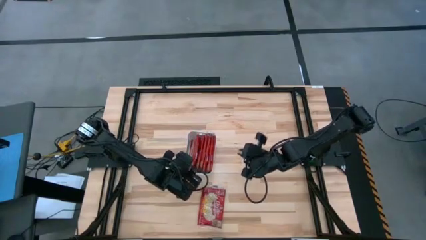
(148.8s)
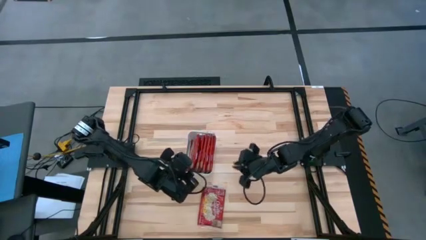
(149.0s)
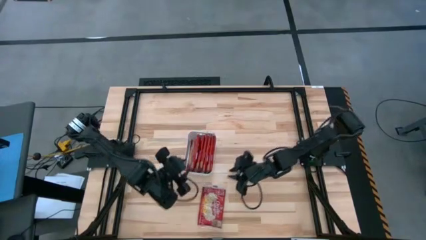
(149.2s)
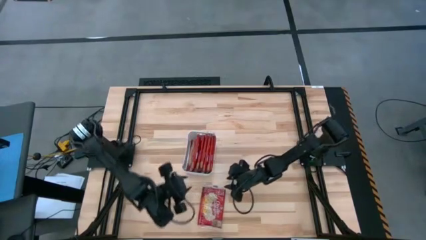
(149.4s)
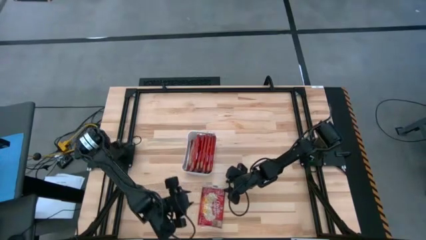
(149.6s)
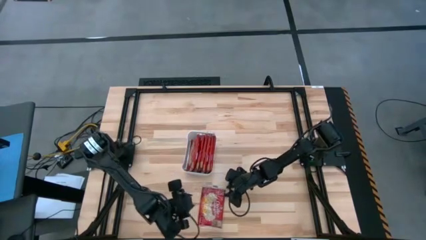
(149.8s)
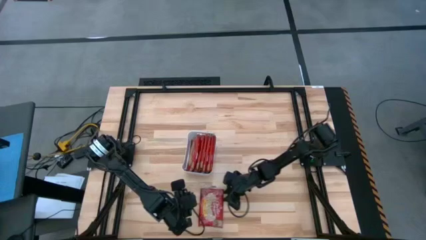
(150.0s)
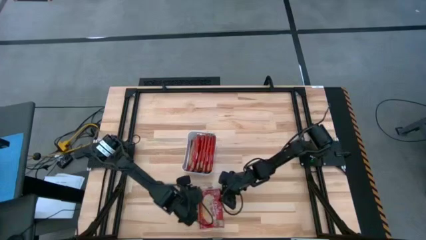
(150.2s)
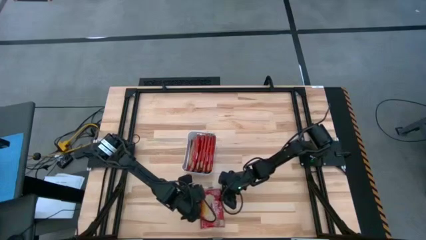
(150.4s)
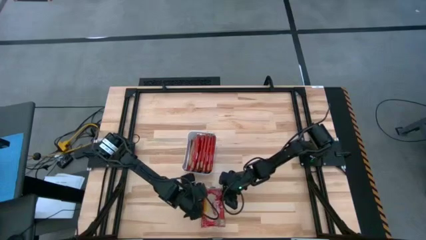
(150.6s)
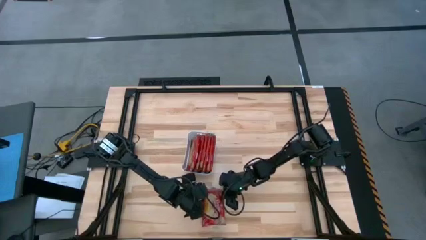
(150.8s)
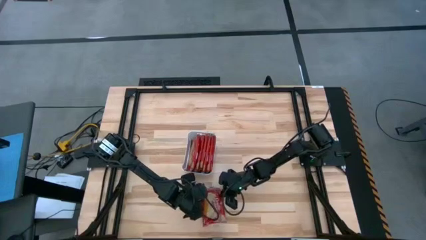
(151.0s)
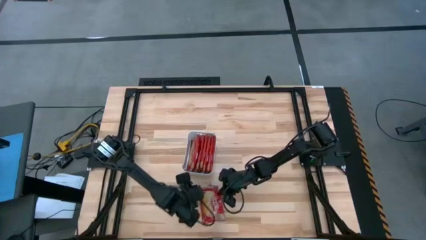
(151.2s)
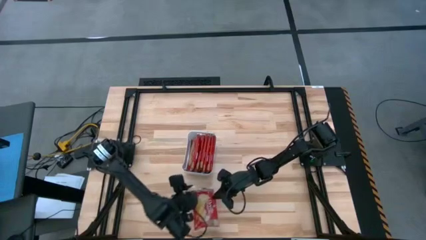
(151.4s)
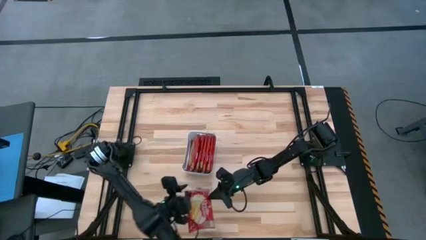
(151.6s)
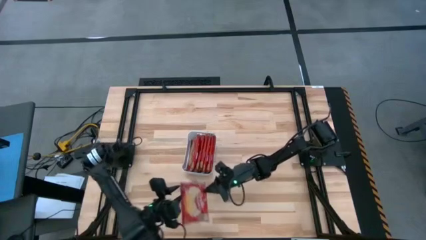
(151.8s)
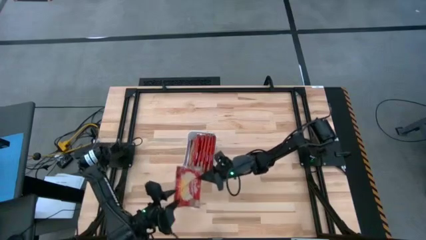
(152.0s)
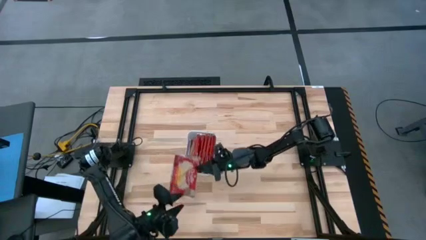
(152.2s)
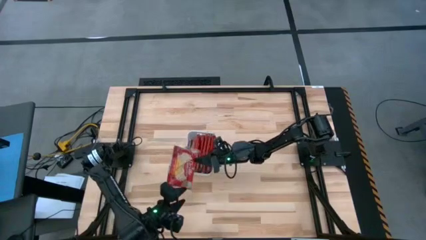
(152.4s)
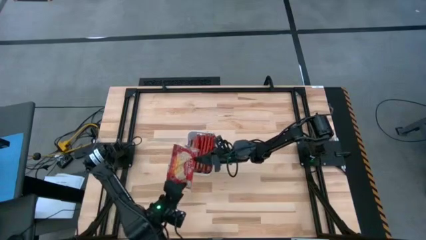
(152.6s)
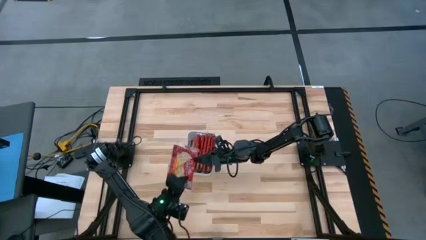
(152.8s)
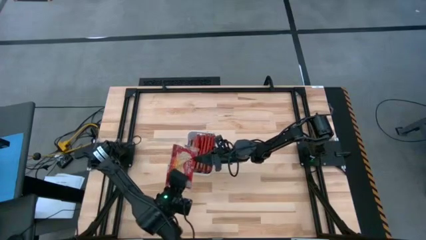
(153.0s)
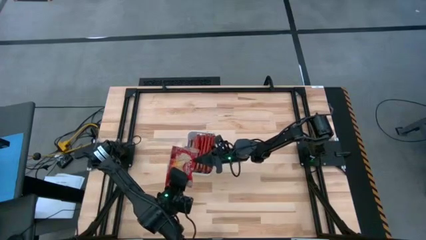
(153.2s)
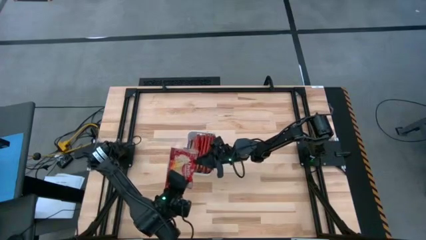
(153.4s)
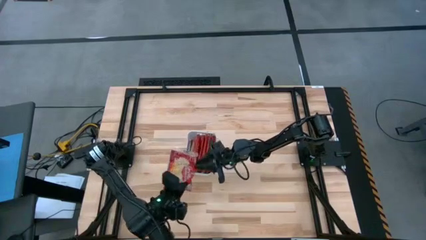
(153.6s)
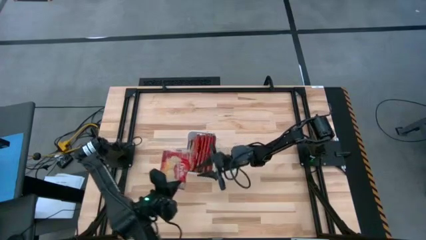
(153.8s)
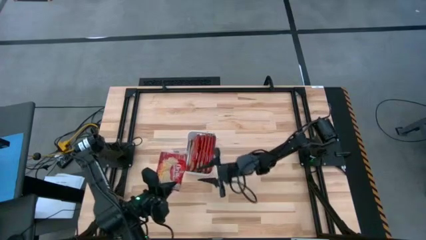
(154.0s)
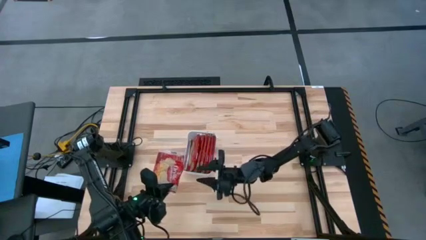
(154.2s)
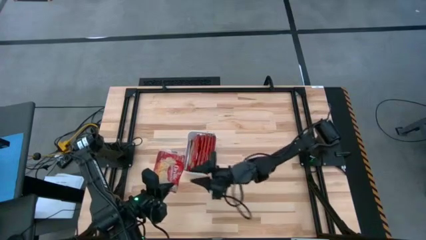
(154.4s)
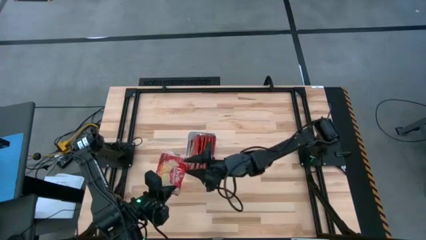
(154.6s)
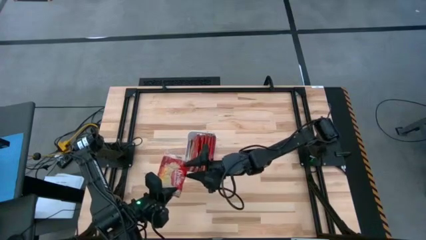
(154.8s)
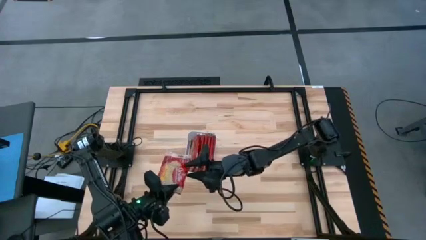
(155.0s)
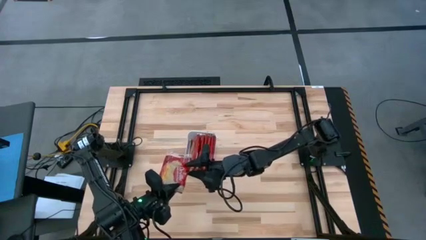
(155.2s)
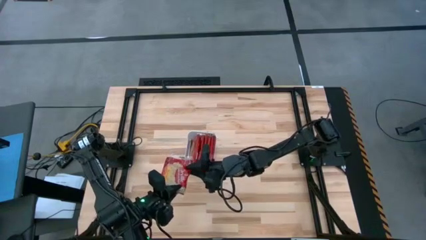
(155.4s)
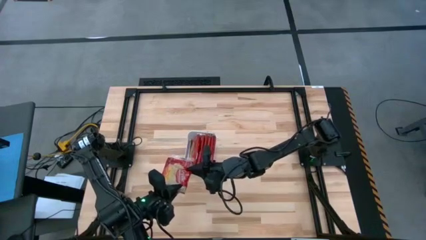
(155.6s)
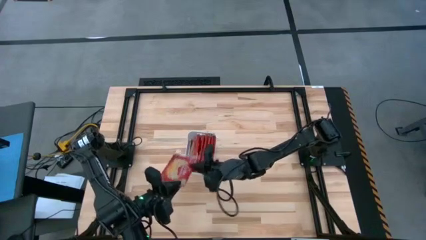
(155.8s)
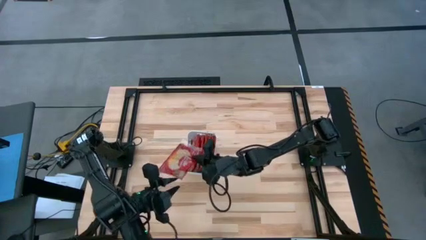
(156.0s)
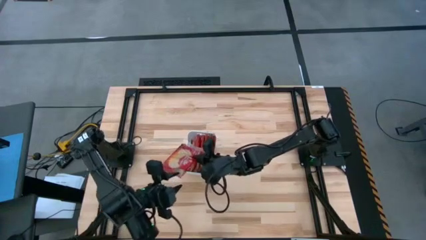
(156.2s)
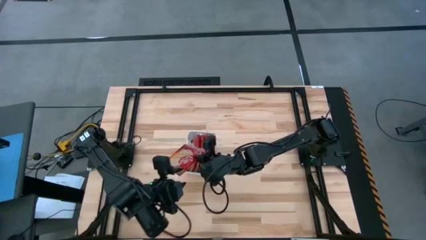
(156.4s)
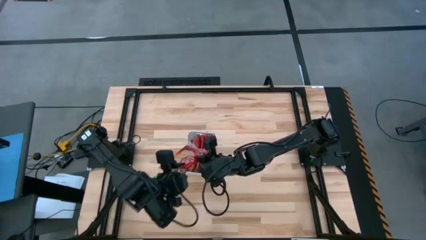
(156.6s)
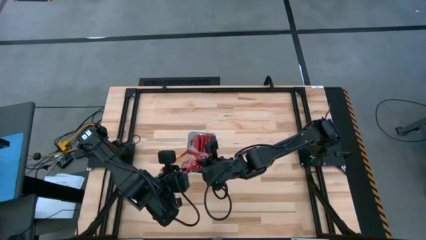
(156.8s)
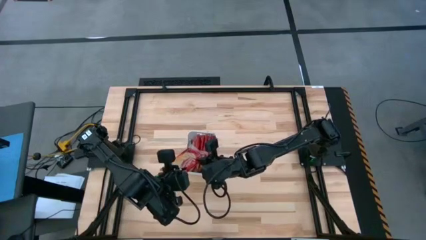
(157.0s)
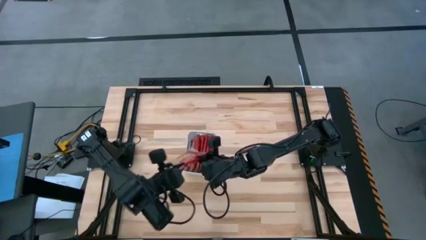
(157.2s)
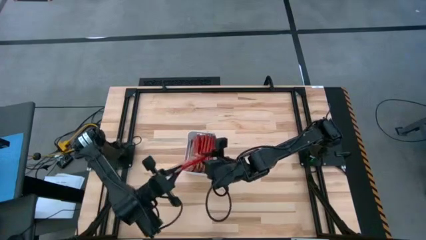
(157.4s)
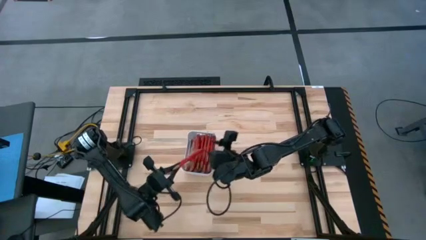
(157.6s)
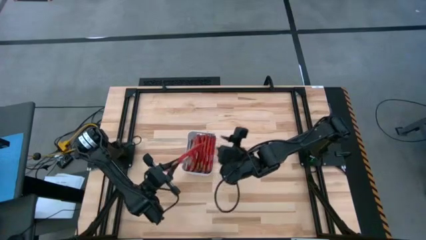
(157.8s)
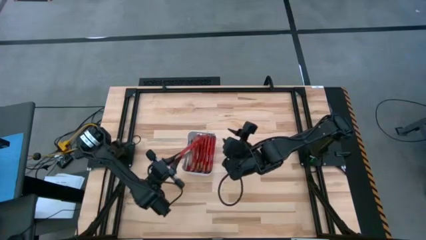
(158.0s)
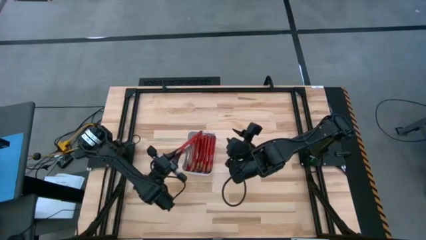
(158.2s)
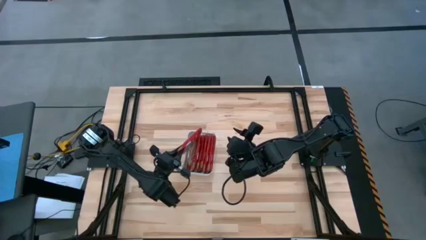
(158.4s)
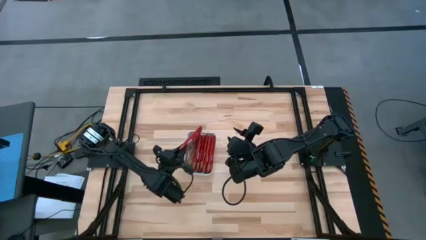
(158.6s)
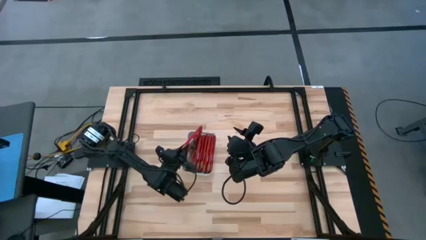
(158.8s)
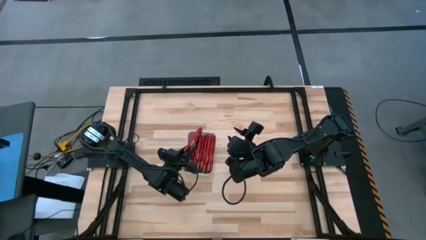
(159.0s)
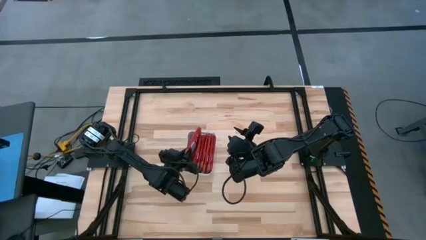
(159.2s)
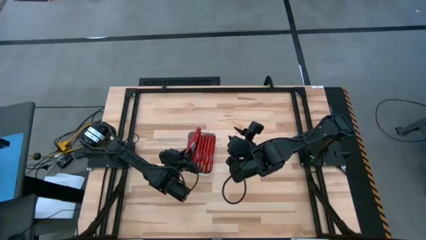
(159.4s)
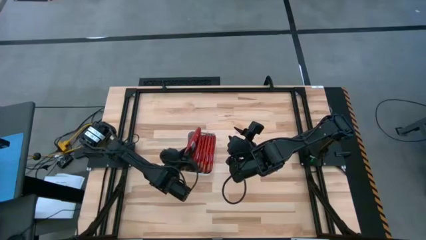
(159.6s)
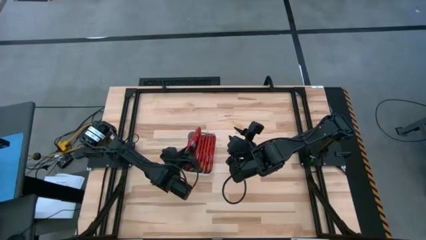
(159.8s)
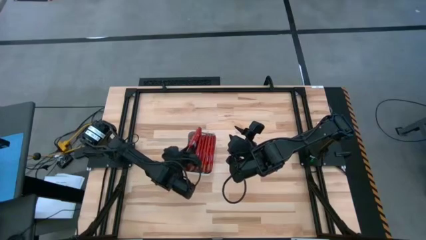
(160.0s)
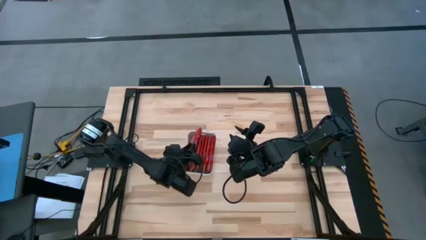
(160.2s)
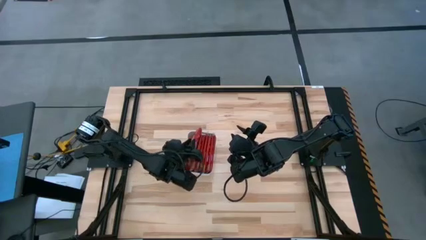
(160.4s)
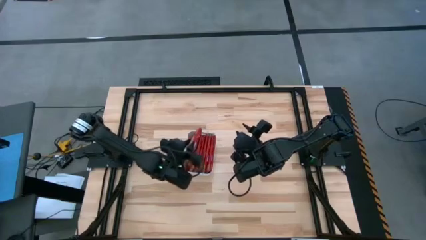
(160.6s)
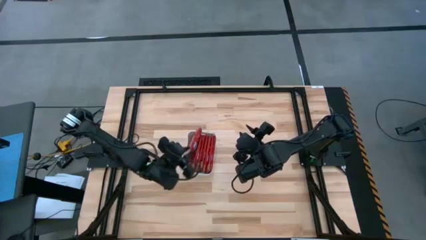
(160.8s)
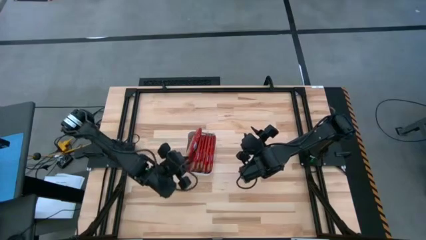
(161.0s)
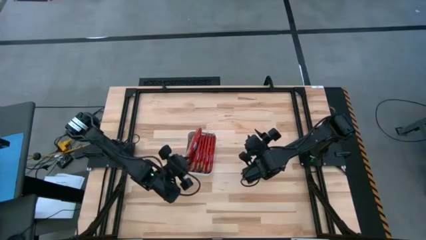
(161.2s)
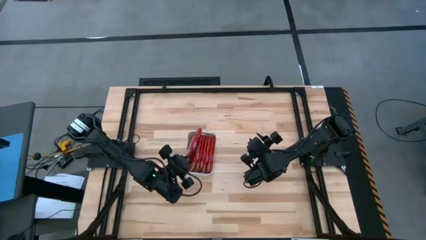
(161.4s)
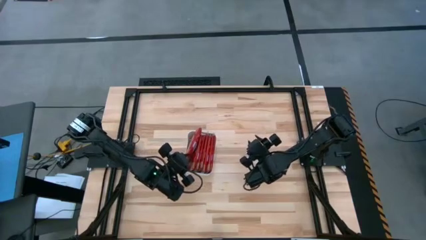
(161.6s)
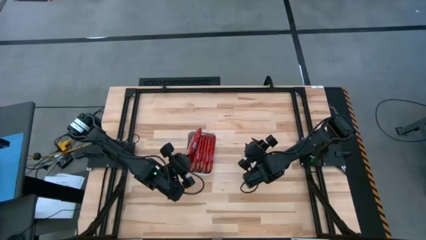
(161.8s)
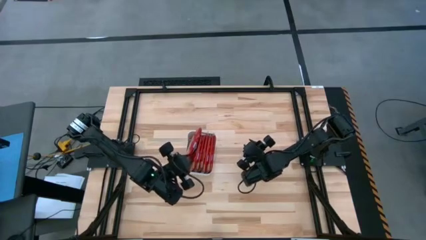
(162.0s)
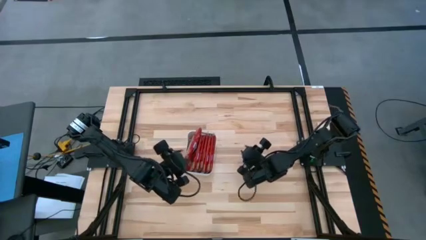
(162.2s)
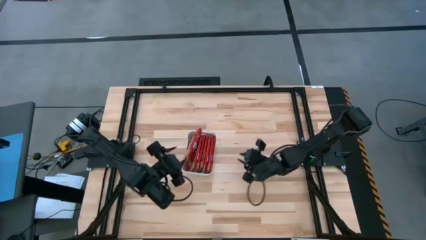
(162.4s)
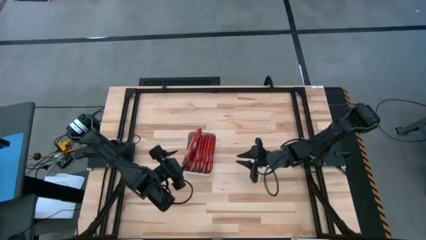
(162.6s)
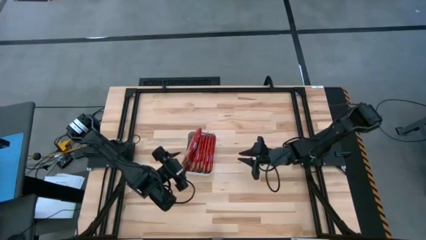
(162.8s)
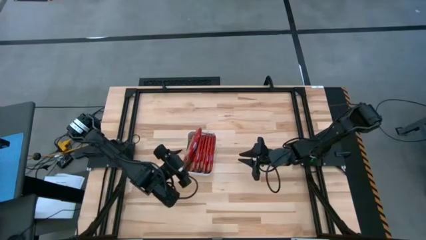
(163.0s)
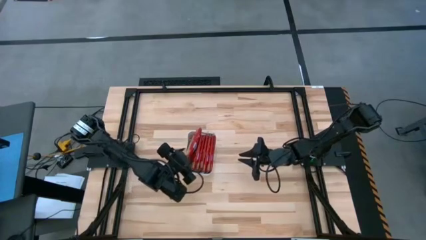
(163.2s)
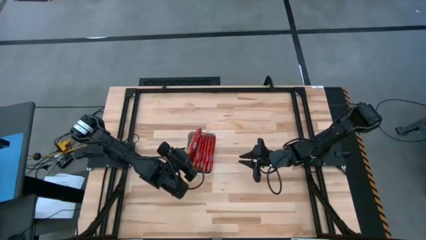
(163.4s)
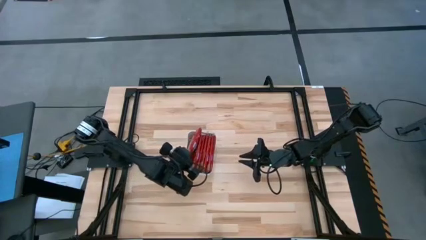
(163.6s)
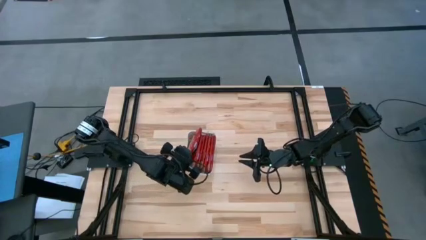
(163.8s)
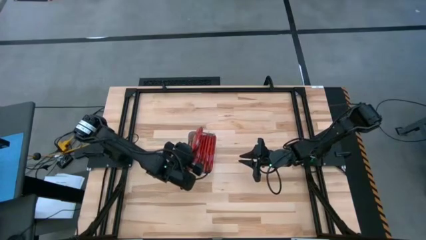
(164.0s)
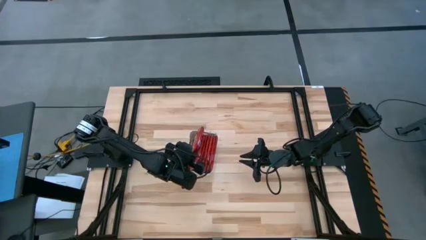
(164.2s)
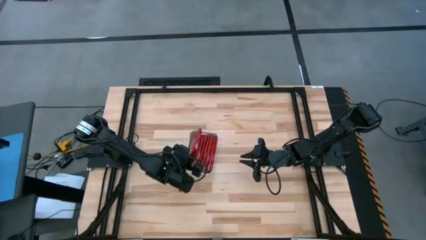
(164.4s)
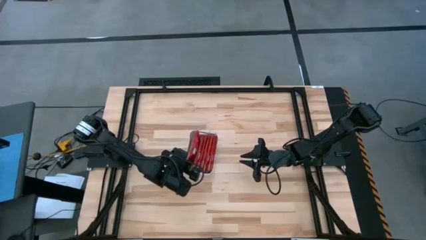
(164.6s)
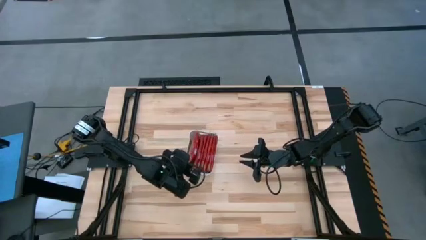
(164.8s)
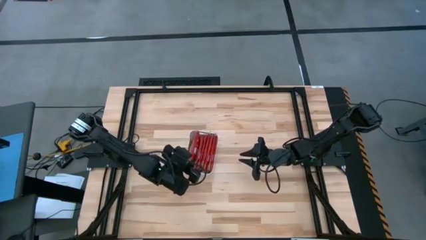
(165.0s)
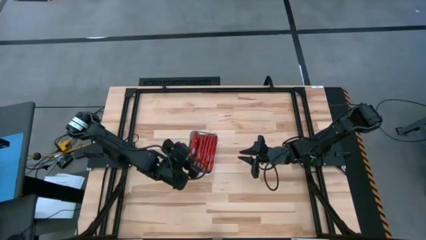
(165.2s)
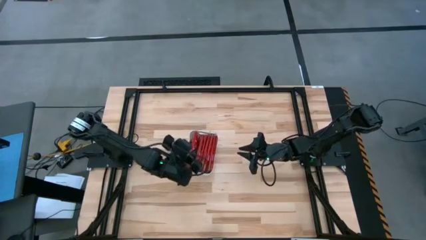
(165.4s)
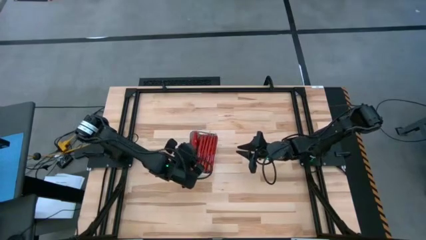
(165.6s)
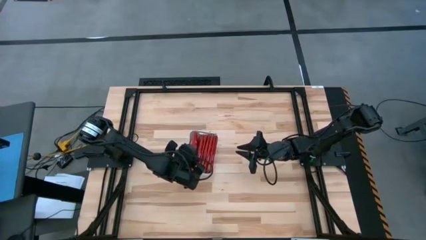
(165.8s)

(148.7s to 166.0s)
Task: Sort popcorn bags into baskets
Put the red popcorn bag into the white bin
